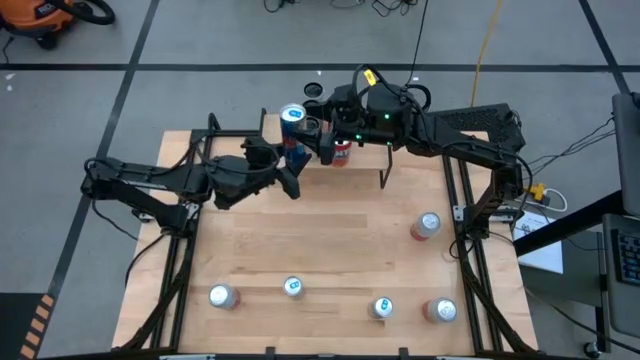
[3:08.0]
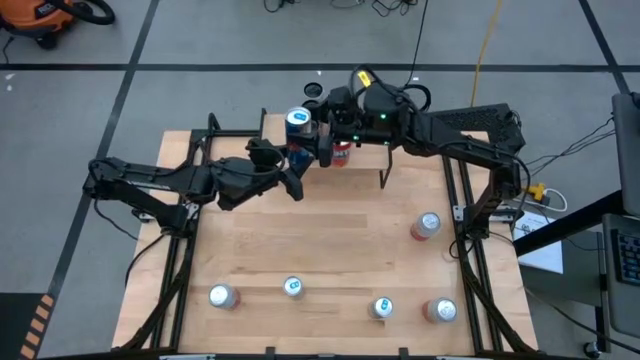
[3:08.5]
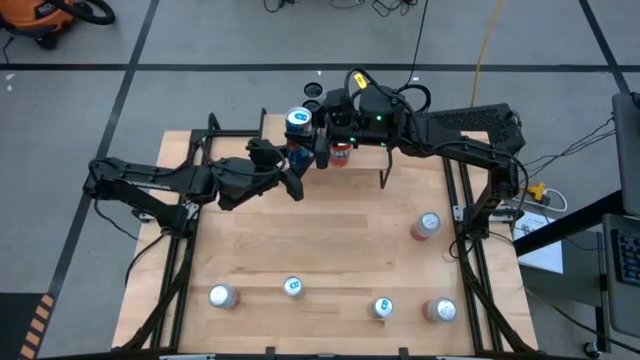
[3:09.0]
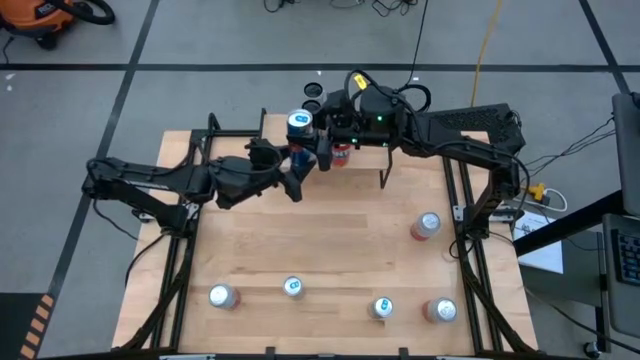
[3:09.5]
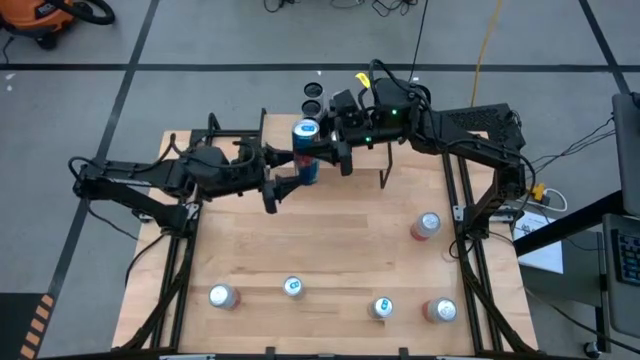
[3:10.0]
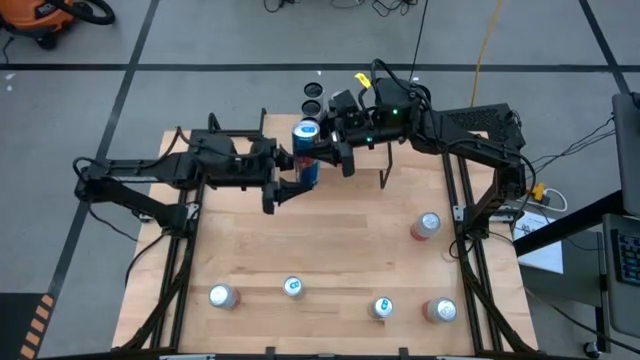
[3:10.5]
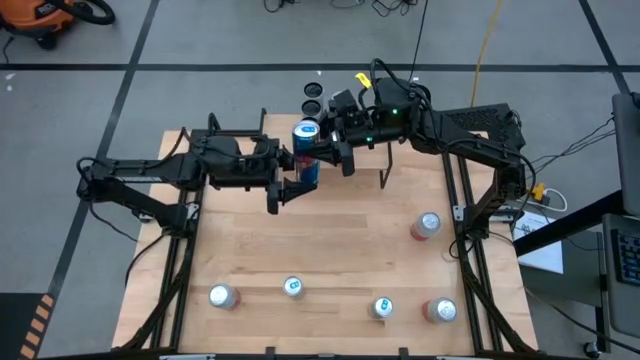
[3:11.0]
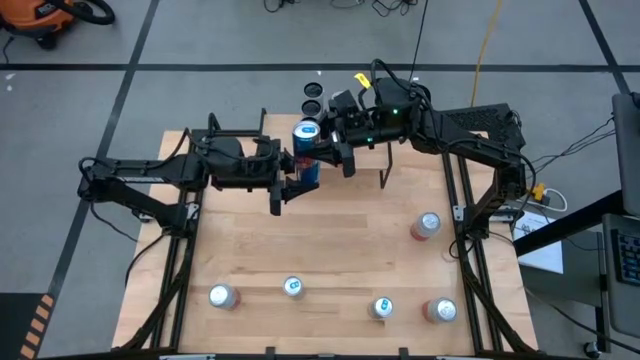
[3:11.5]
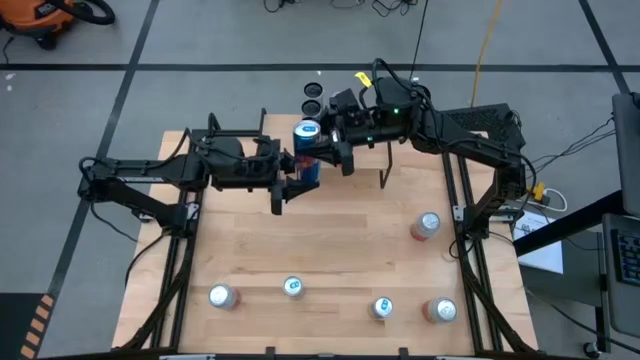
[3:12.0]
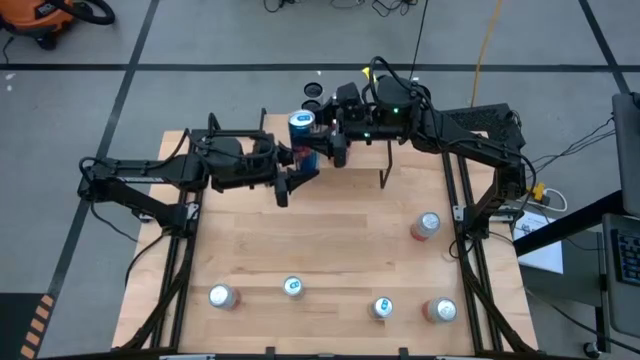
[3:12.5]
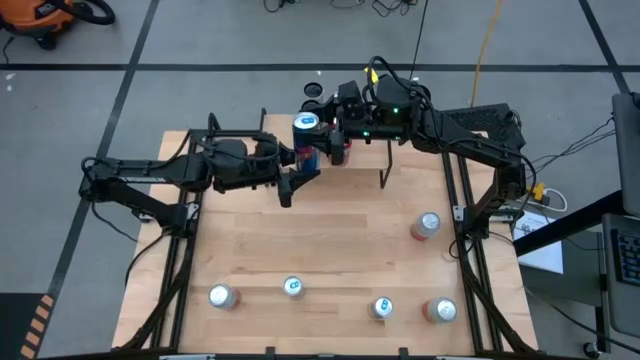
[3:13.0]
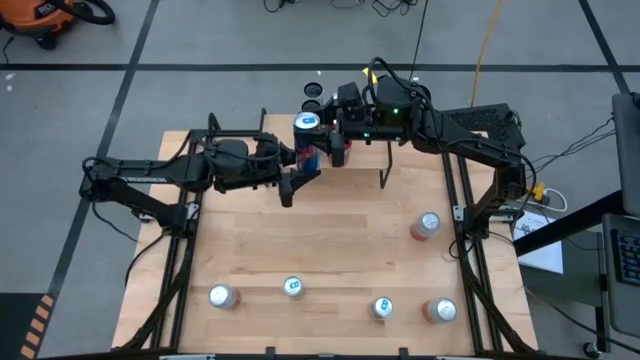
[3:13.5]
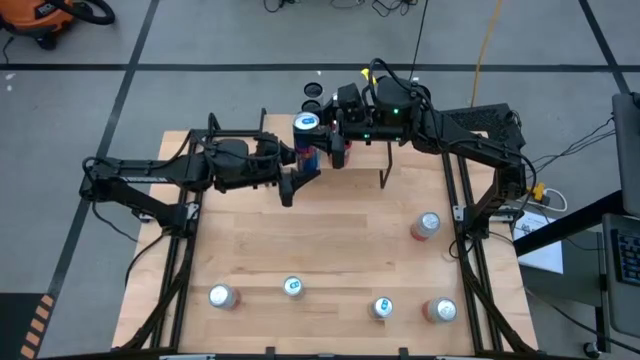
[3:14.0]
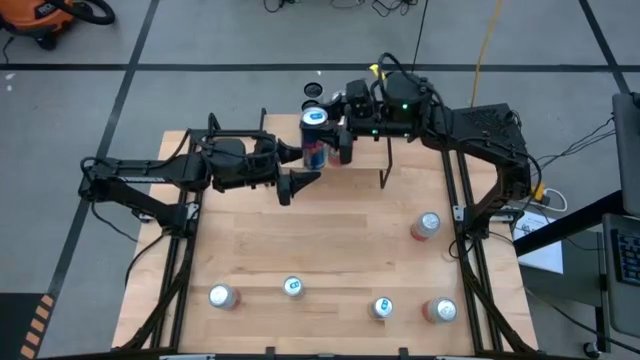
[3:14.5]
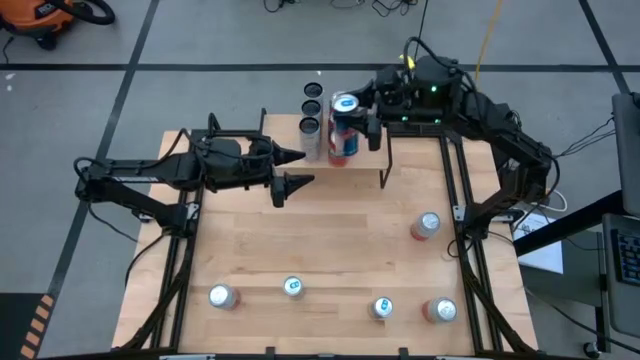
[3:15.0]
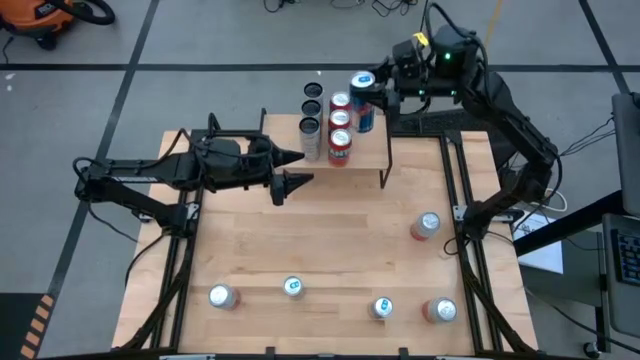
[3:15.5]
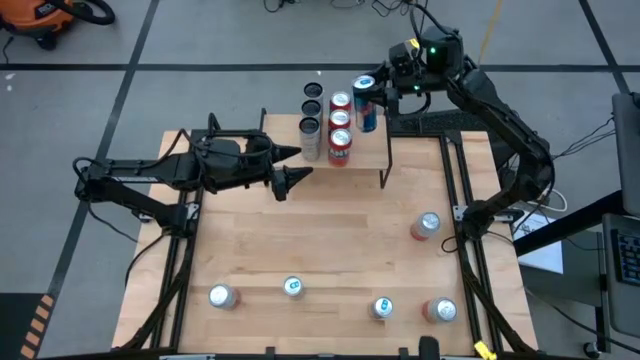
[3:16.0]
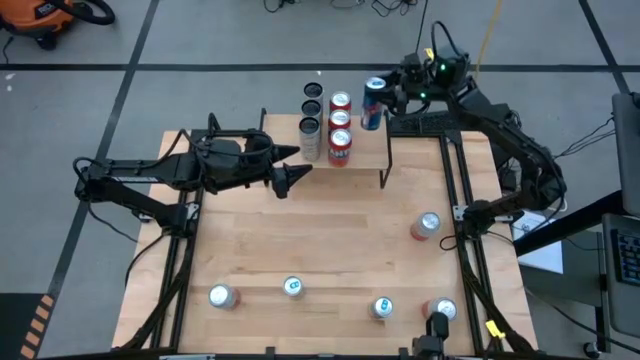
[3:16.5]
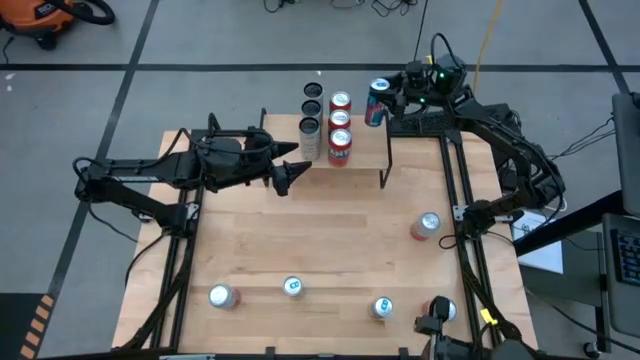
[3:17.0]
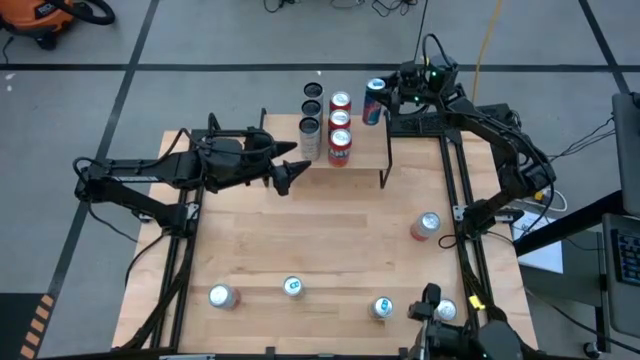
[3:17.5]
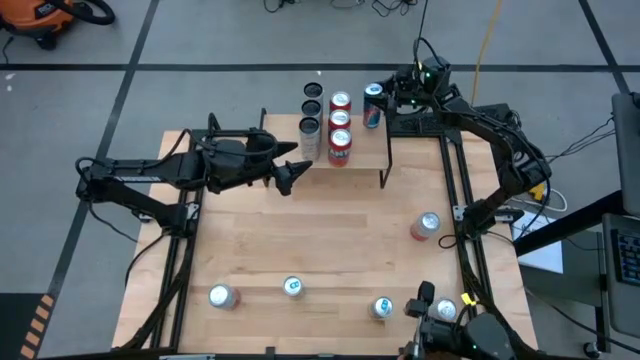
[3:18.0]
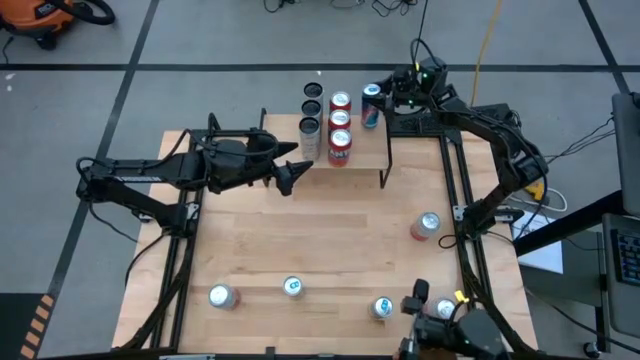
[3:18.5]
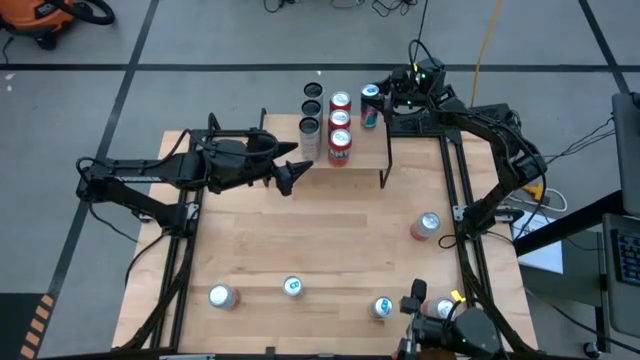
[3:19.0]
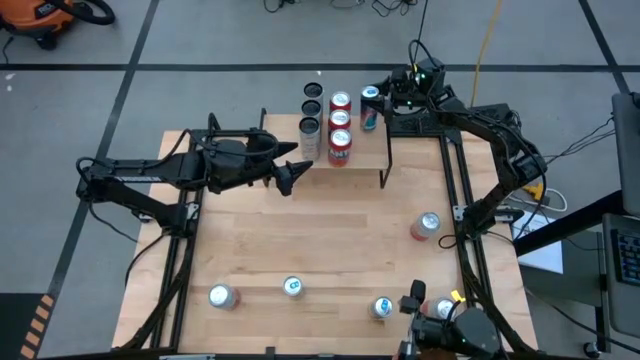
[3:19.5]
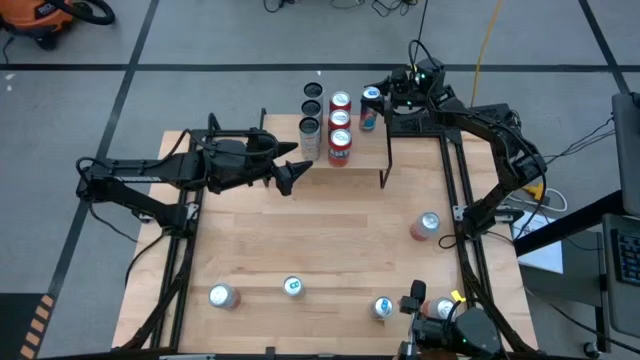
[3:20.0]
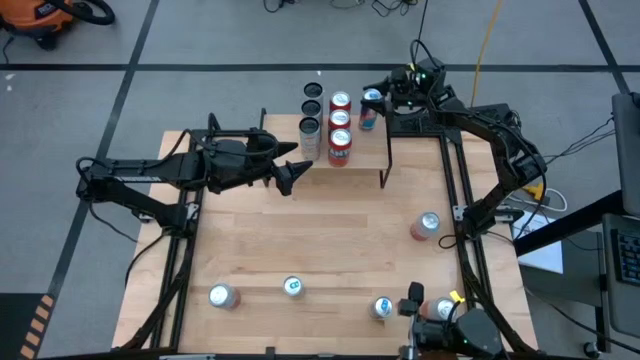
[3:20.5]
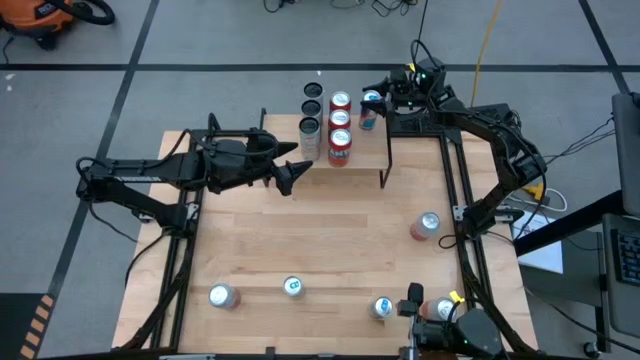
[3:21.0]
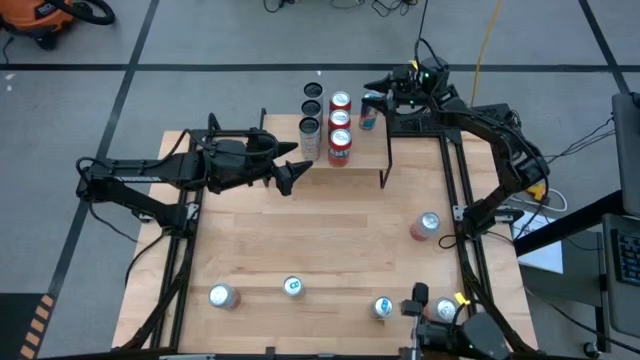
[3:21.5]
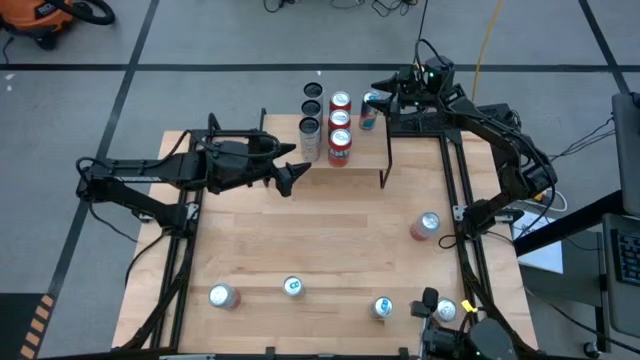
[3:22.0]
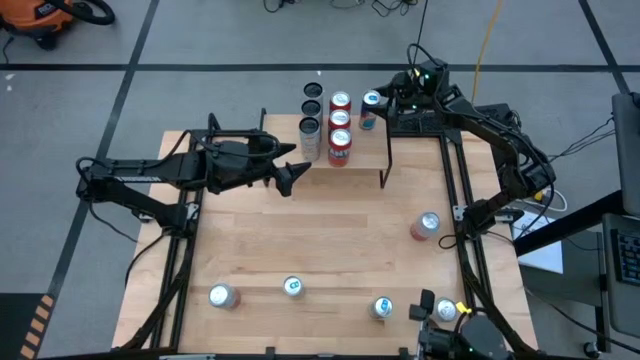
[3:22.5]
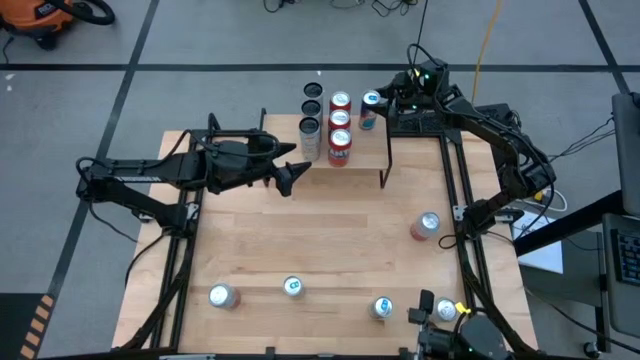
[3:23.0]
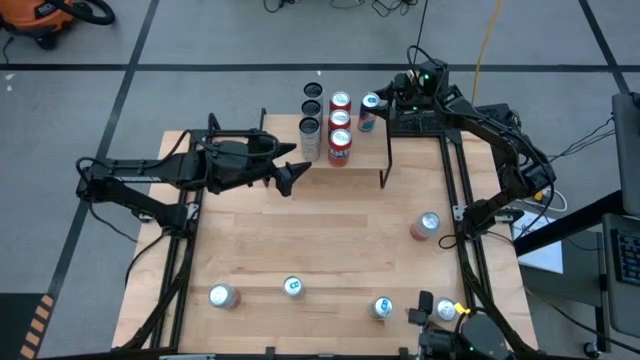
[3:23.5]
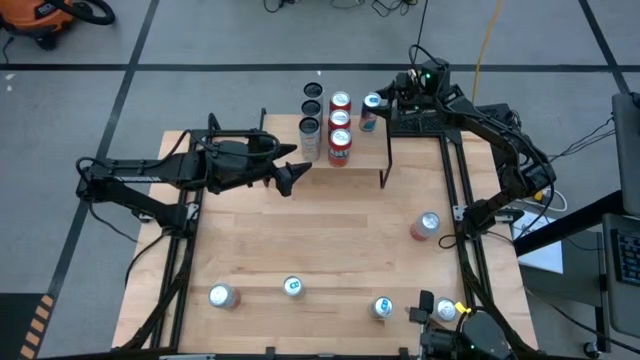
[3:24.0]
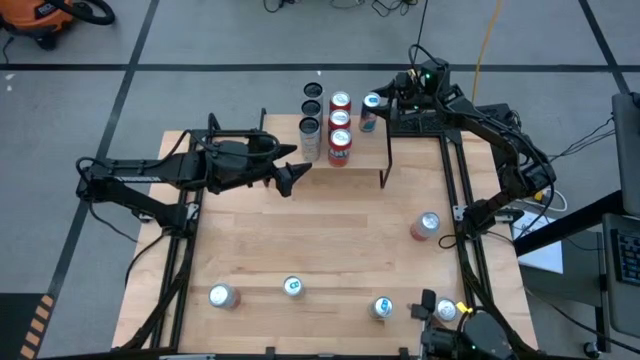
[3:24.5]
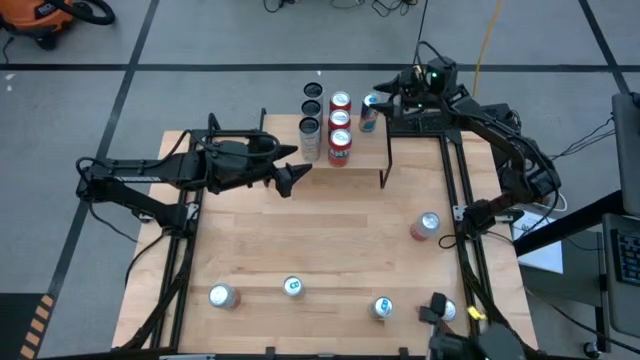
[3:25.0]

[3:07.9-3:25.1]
Task: Place canned beverage on shelf
Put the left blue soda can on the shelf
